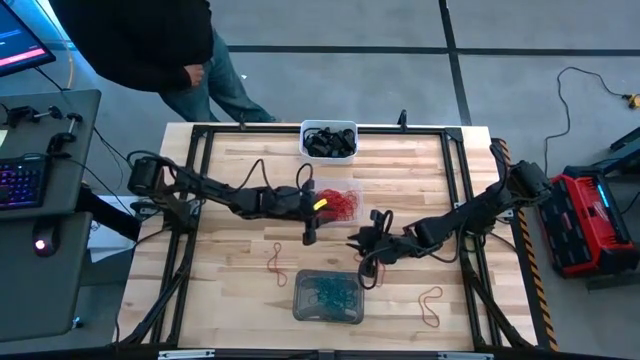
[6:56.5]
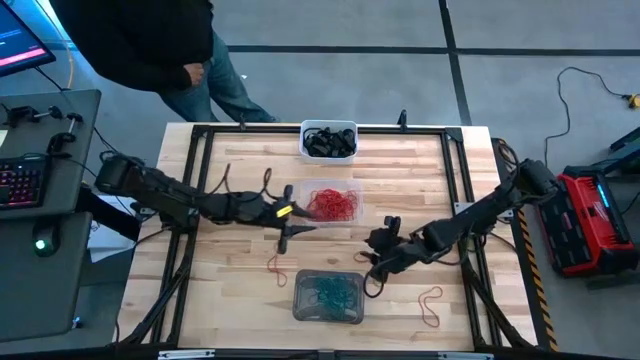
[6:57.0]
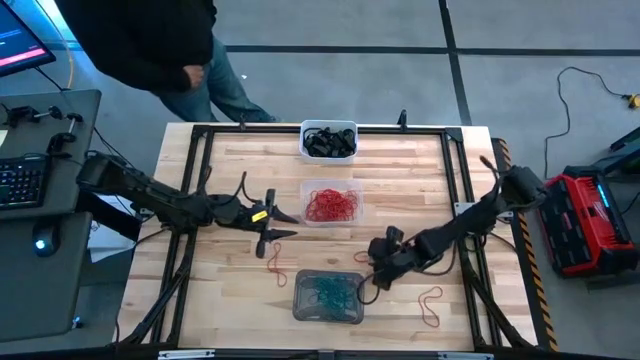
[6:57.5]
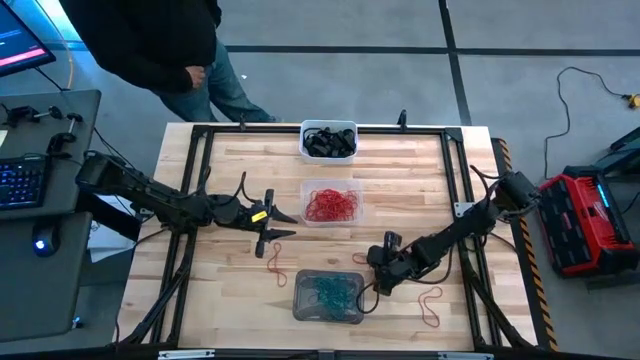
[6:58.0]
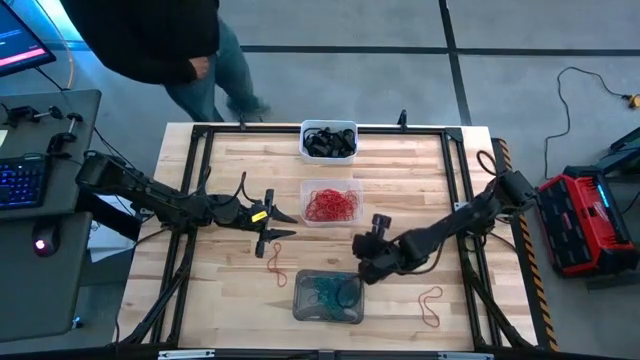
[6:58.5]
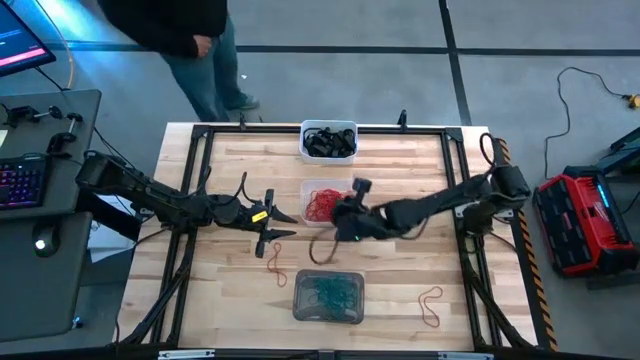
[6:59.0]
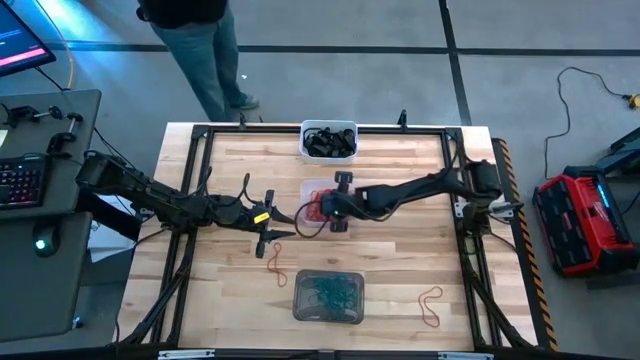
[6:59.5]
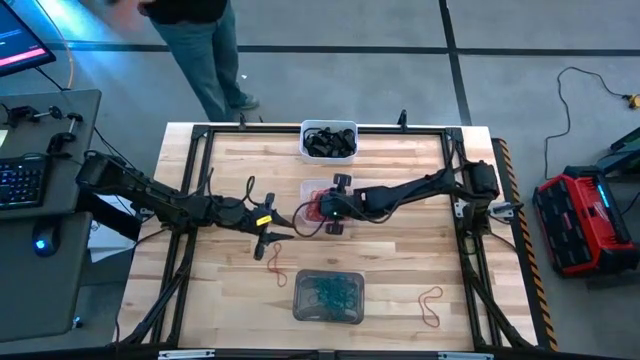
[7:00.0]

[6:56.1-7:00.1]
Task: Sort rubber bands into baskets
Put the red rubber band into the transparent bin

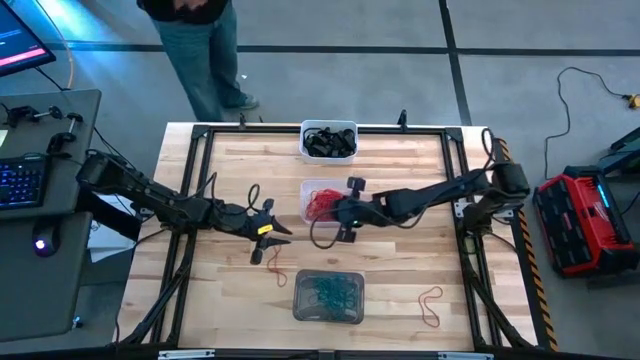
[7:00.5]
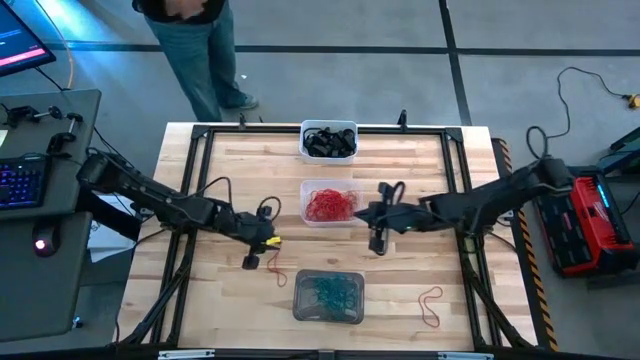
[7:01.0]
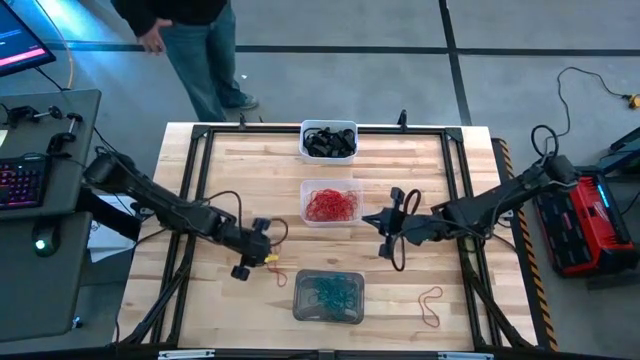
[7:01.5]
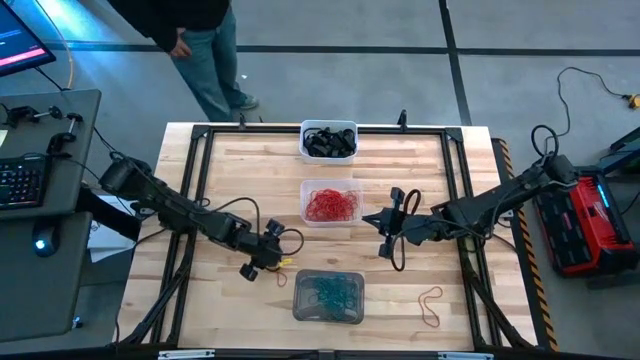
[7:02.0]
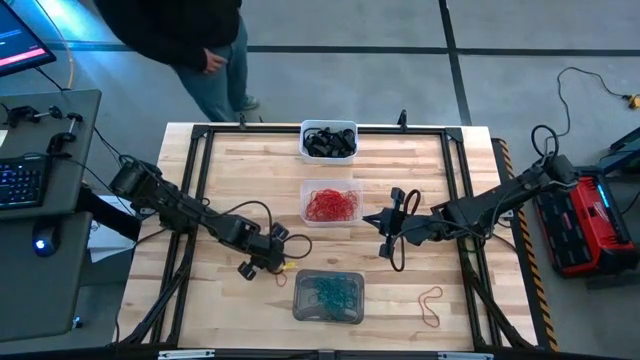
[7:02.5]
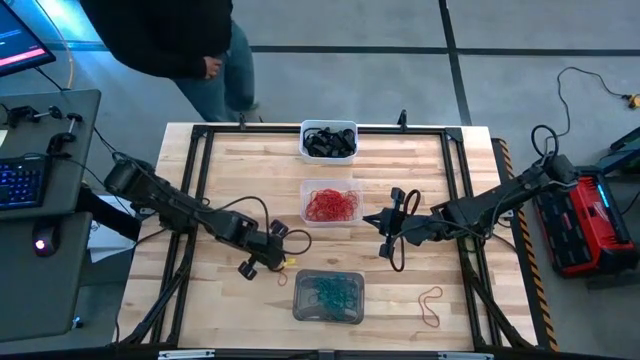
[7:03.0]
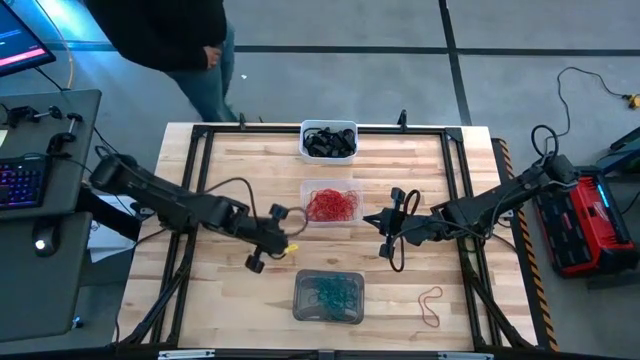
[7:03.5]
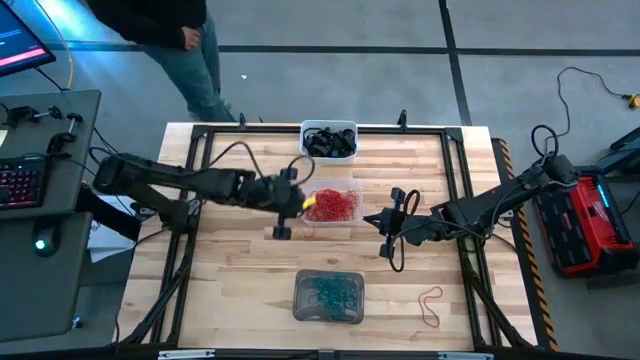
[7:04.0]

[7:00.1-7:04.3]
Put the red rubber band into the transparent bin

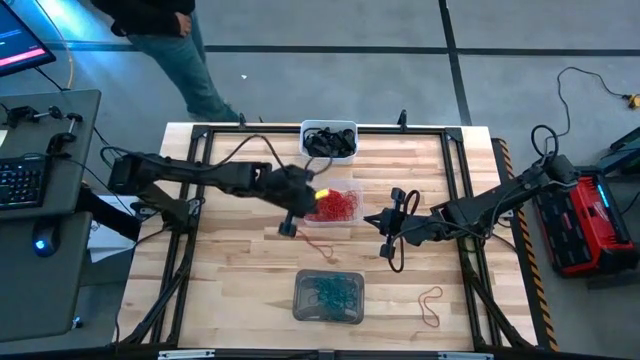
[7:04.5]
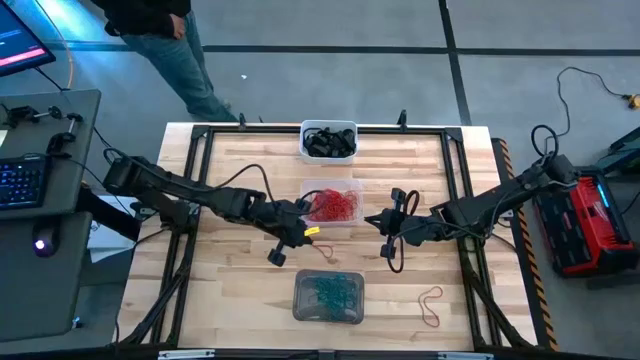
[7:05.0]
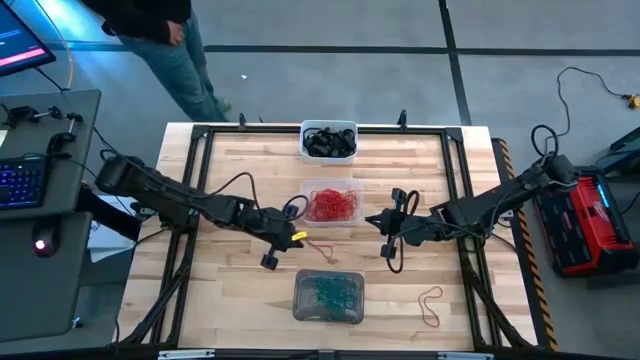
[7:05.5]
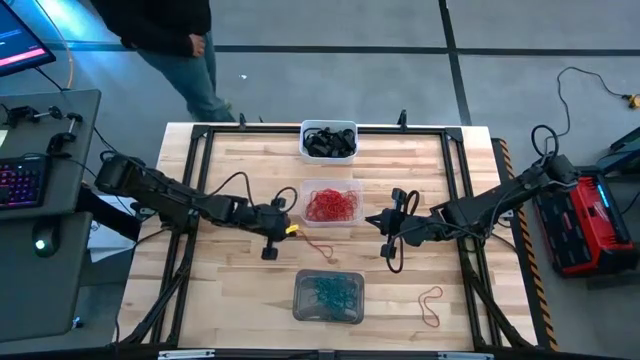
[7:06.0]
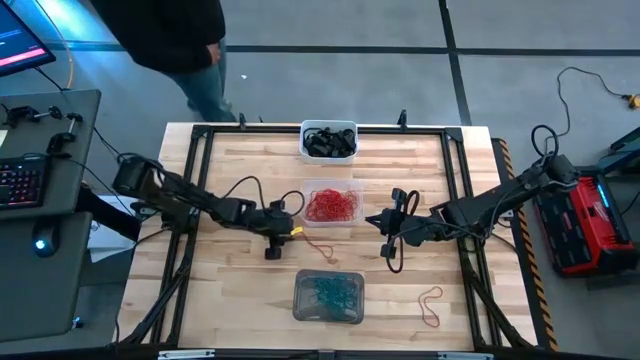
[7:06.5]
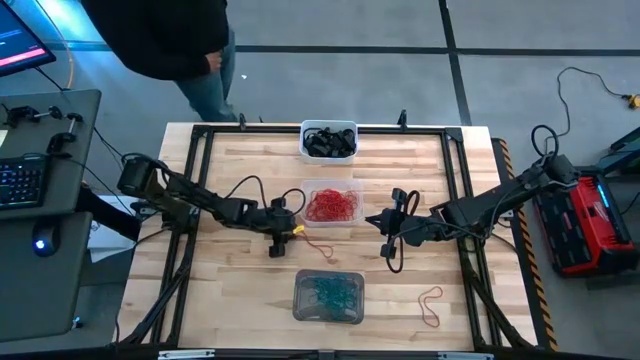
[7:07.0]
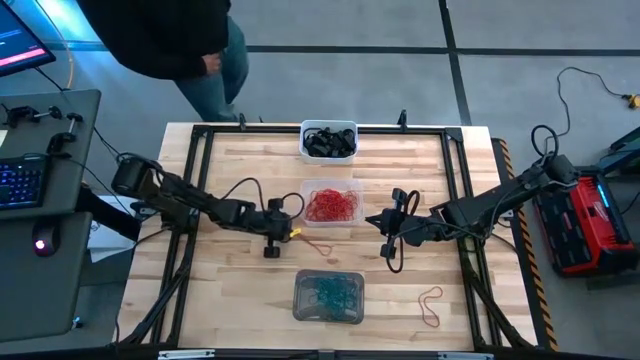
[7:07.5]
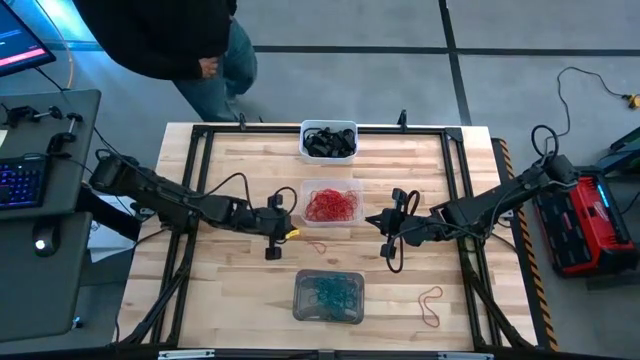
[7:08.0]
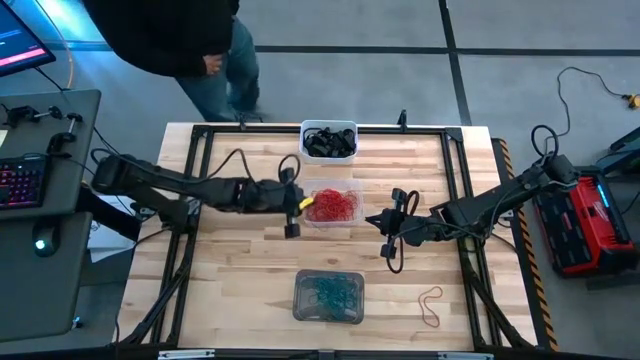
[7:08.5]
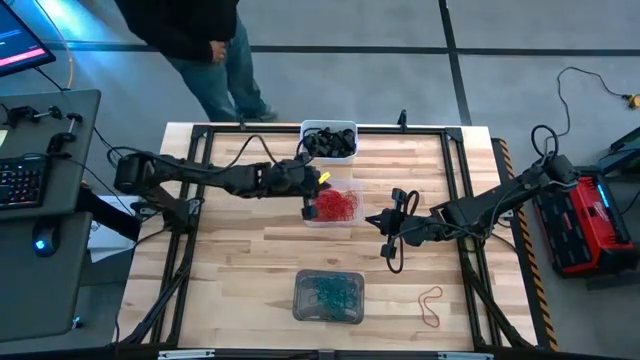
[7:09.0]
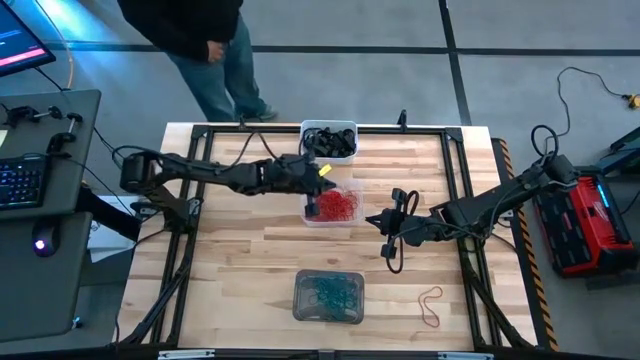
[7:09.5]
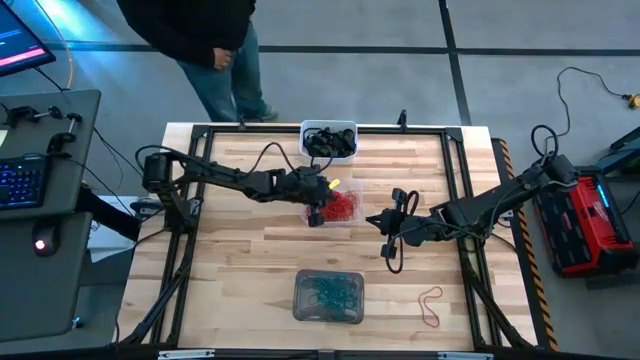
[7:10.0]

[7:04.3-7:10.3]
Put the red rubber band into the transparent bin

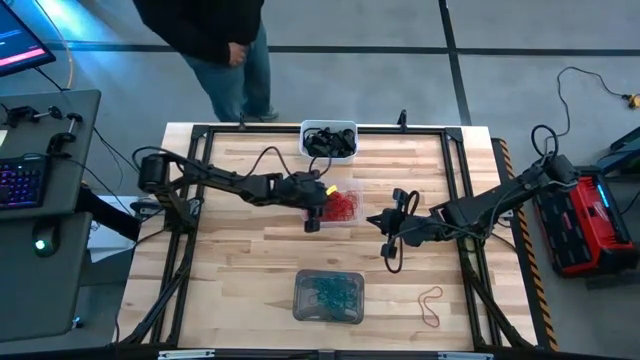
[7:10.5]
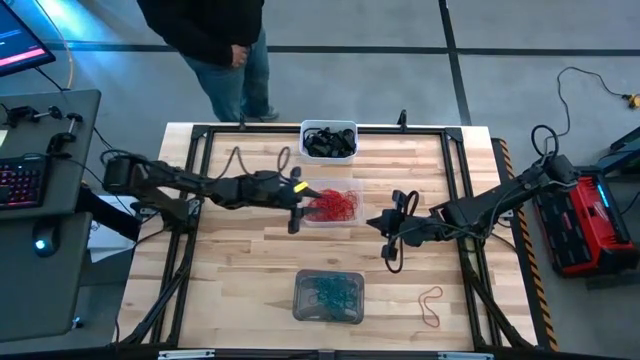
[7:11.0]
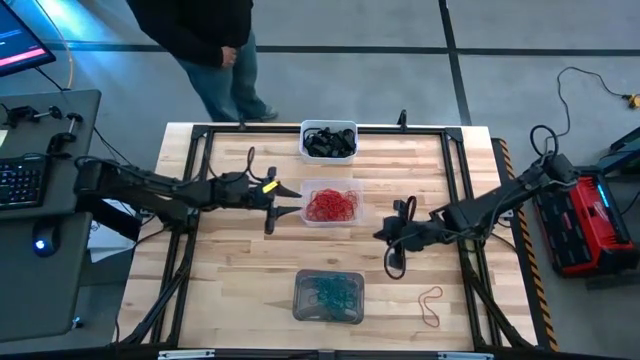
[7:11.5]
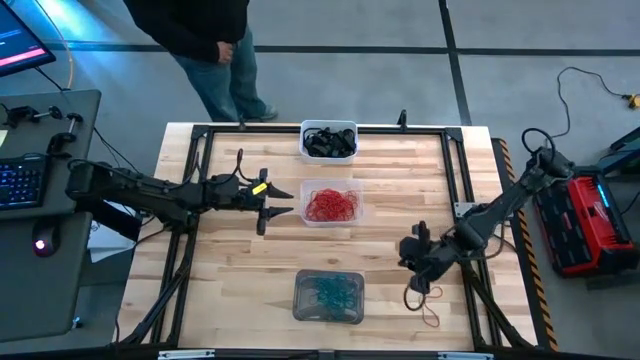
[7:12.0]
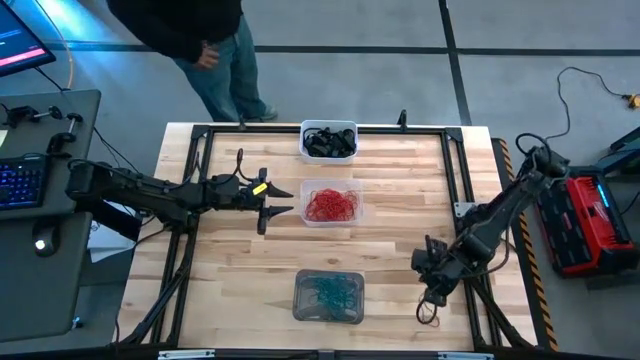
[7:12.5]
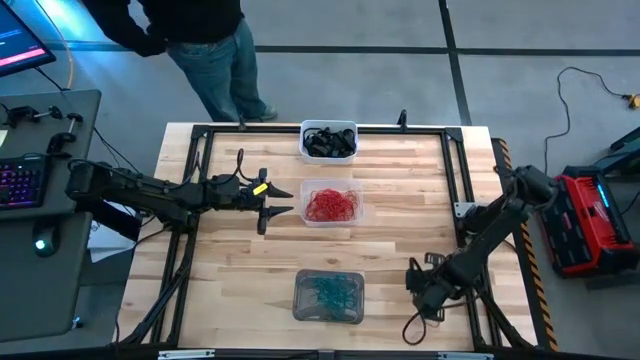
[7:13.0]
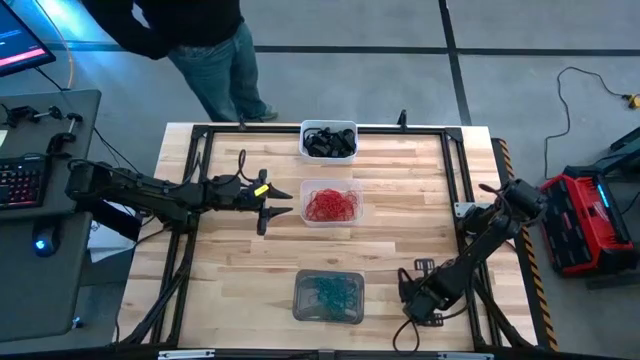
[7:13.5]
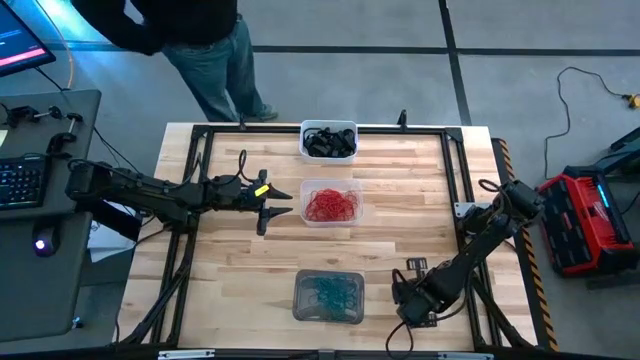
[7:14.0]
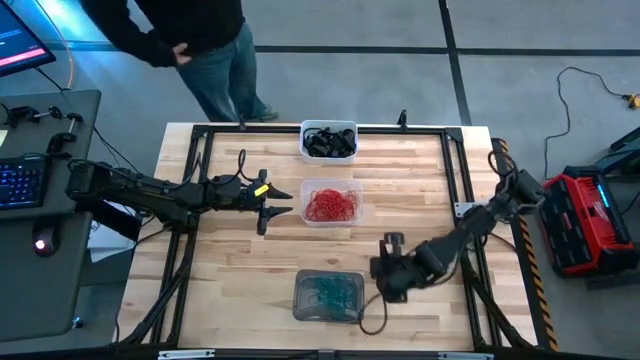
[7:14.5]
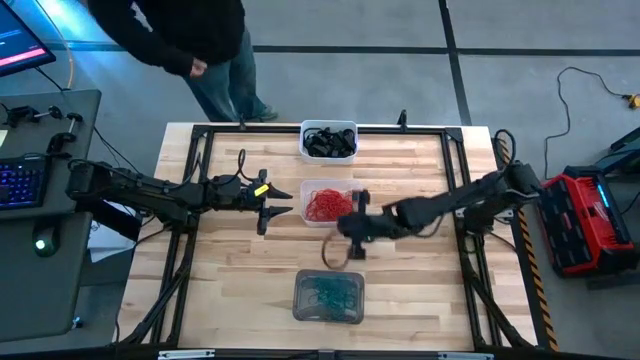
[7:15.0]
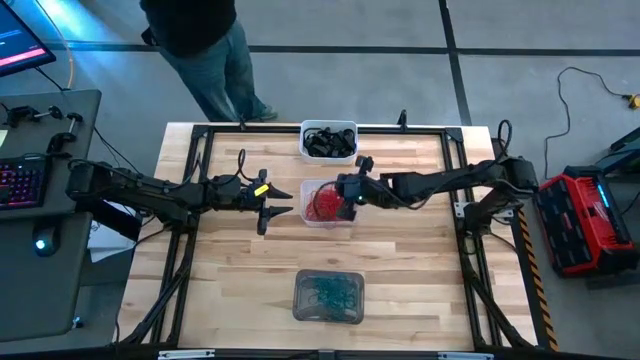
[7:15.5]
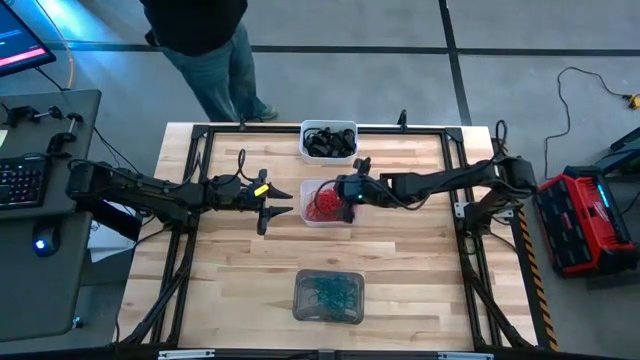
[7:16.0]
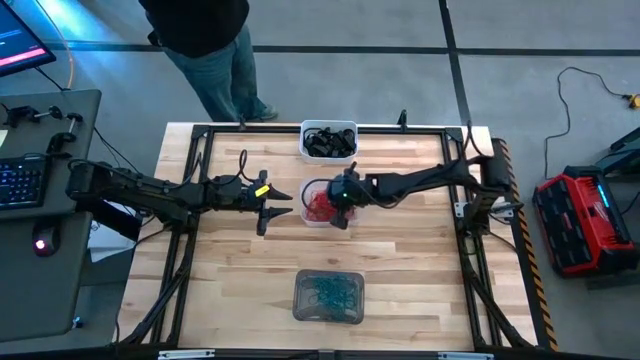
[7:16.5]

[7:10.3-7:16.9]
Put the red rubber band into the transparent bin
